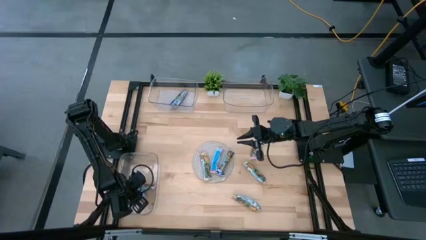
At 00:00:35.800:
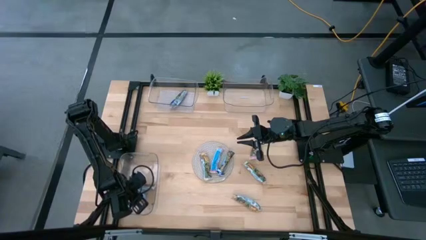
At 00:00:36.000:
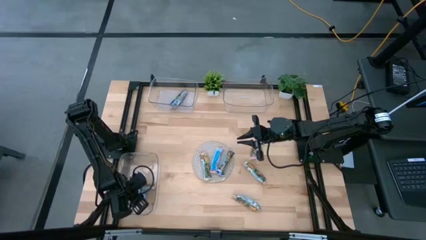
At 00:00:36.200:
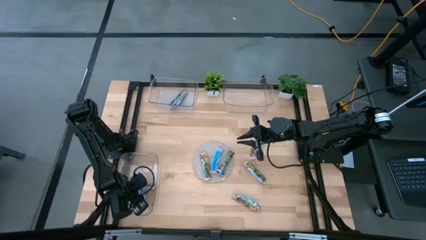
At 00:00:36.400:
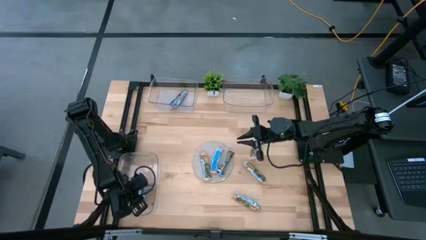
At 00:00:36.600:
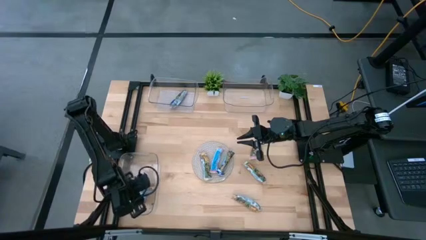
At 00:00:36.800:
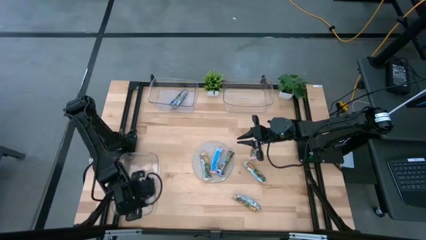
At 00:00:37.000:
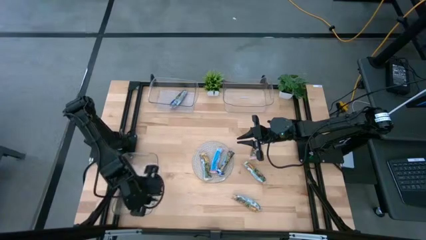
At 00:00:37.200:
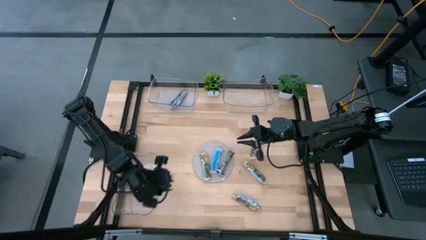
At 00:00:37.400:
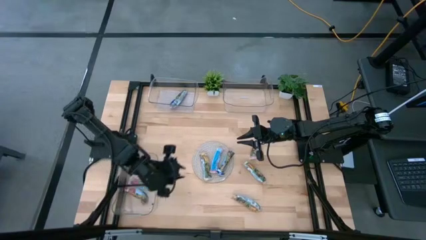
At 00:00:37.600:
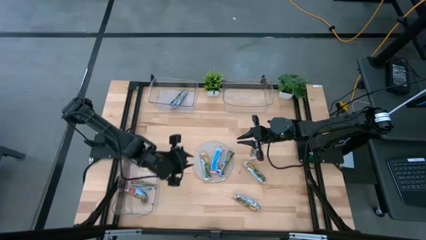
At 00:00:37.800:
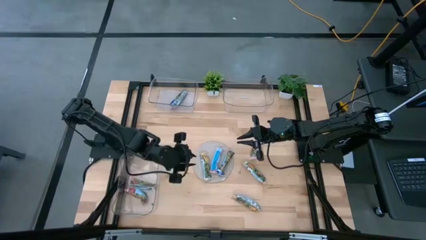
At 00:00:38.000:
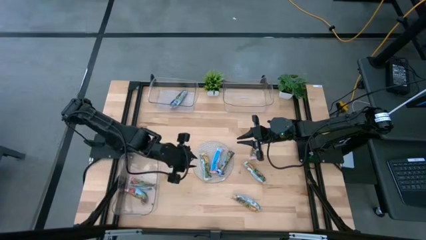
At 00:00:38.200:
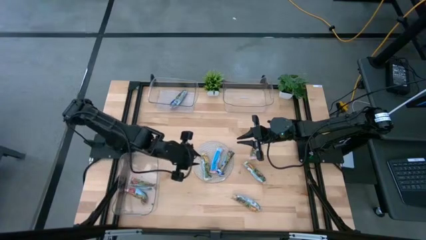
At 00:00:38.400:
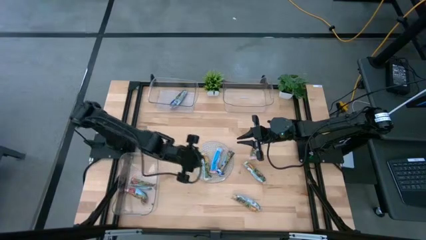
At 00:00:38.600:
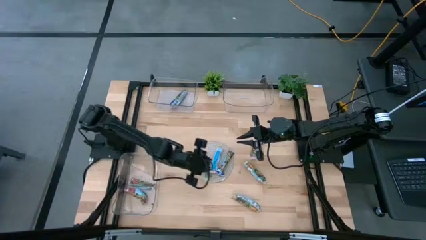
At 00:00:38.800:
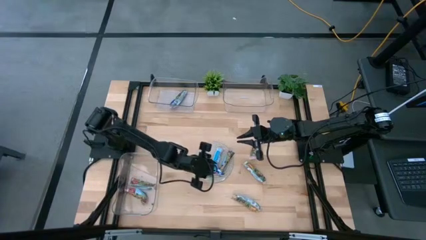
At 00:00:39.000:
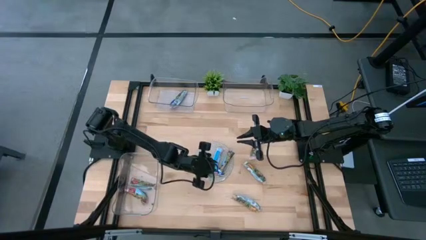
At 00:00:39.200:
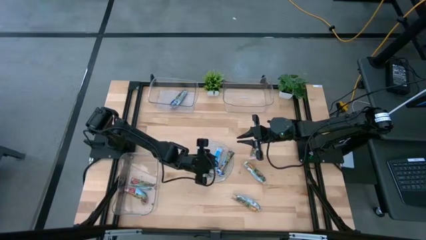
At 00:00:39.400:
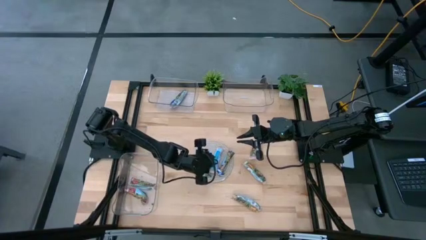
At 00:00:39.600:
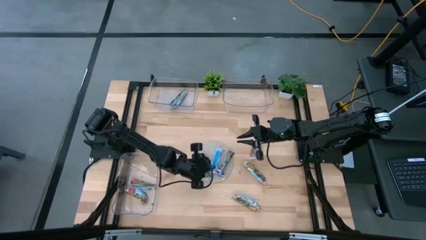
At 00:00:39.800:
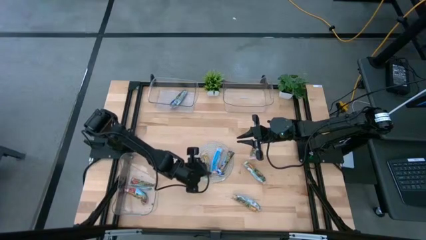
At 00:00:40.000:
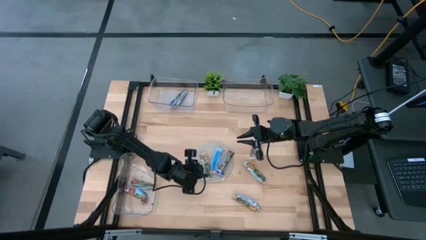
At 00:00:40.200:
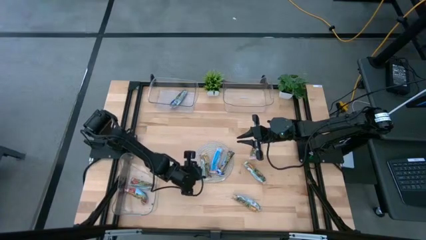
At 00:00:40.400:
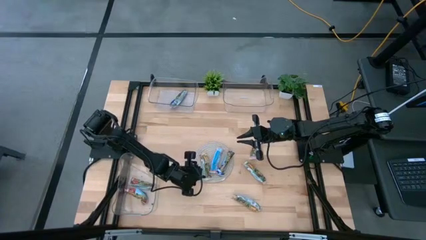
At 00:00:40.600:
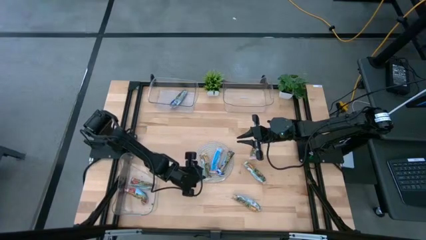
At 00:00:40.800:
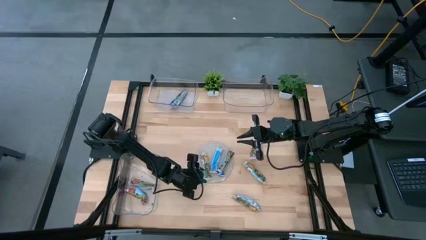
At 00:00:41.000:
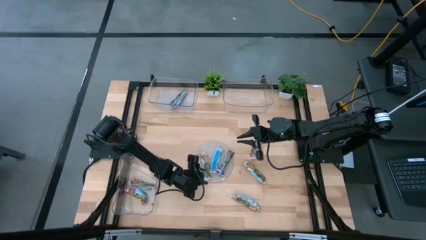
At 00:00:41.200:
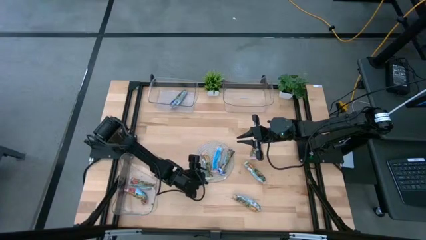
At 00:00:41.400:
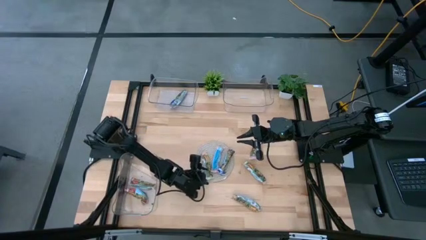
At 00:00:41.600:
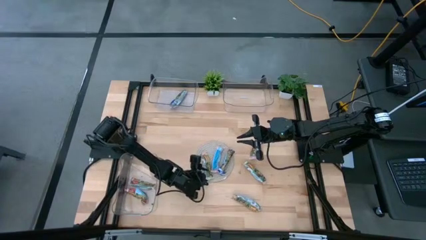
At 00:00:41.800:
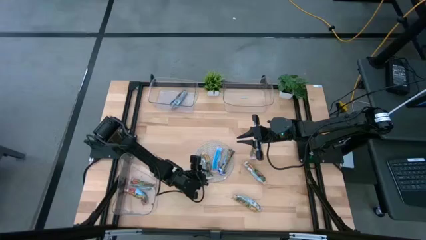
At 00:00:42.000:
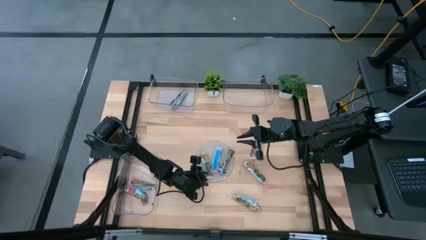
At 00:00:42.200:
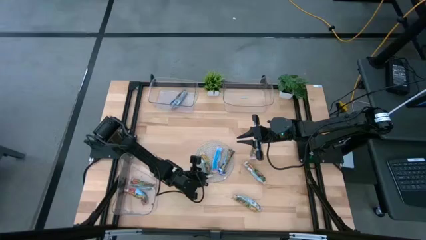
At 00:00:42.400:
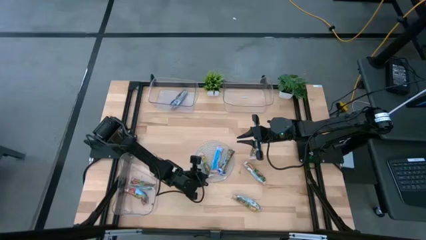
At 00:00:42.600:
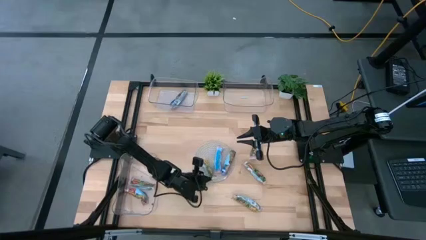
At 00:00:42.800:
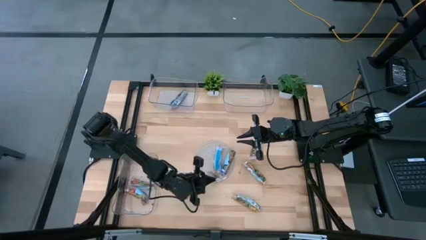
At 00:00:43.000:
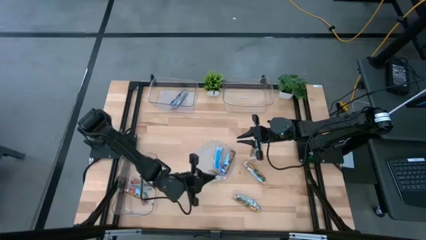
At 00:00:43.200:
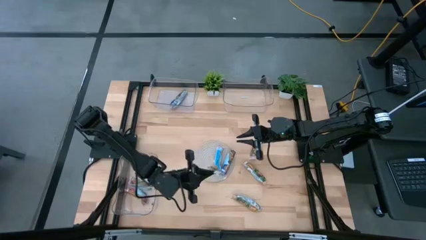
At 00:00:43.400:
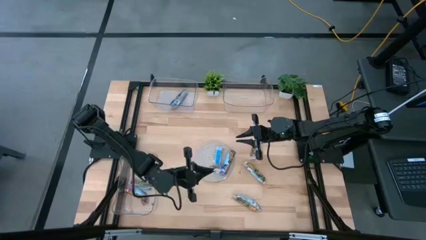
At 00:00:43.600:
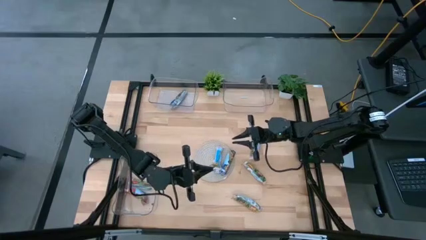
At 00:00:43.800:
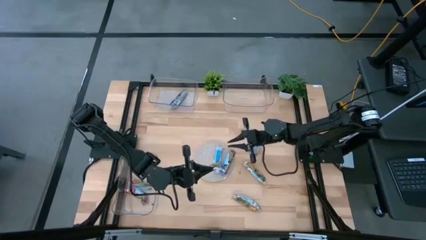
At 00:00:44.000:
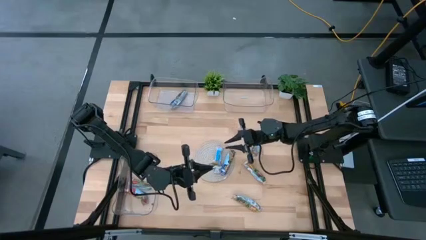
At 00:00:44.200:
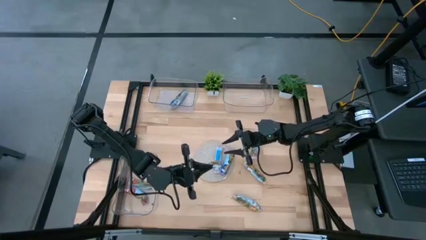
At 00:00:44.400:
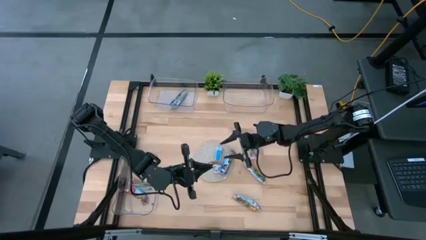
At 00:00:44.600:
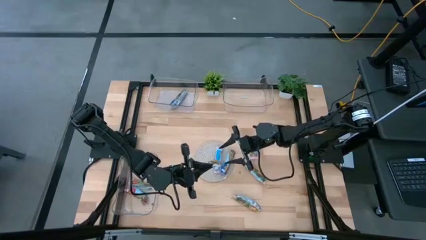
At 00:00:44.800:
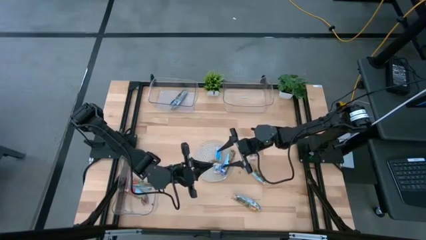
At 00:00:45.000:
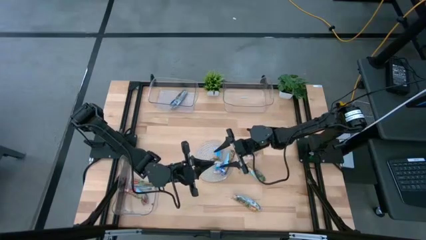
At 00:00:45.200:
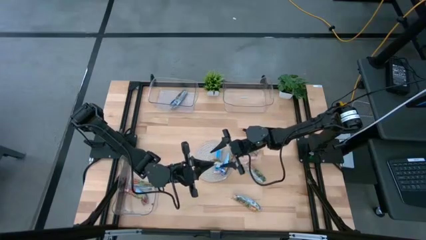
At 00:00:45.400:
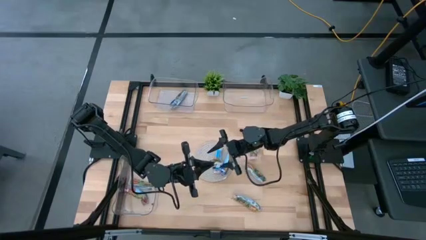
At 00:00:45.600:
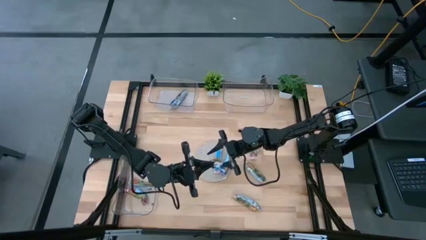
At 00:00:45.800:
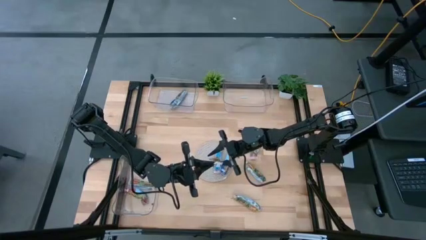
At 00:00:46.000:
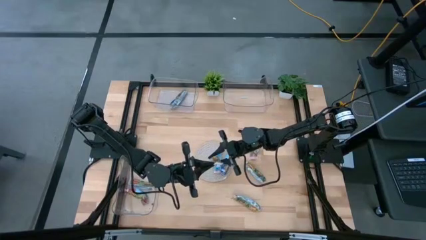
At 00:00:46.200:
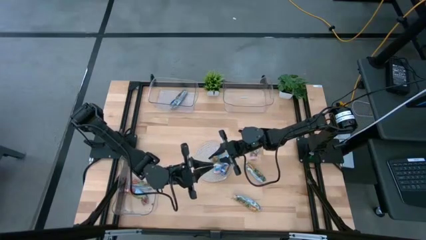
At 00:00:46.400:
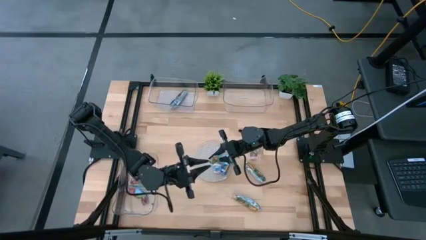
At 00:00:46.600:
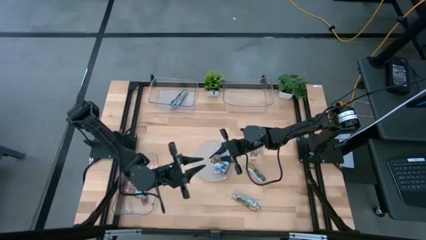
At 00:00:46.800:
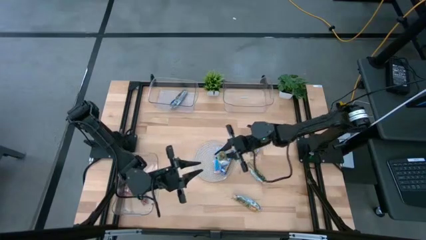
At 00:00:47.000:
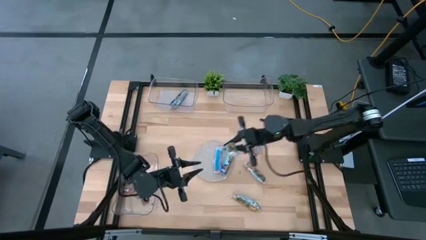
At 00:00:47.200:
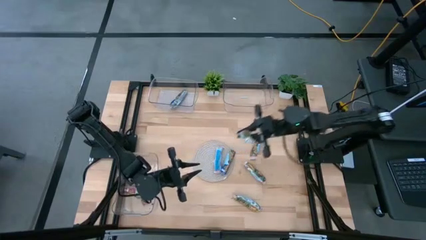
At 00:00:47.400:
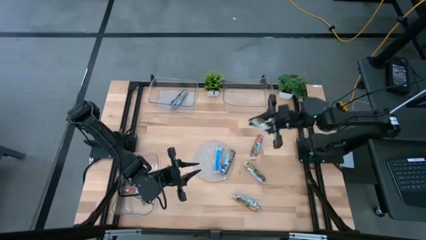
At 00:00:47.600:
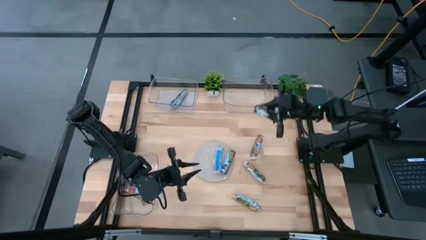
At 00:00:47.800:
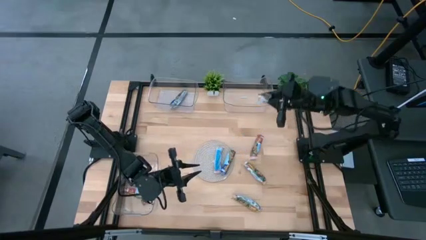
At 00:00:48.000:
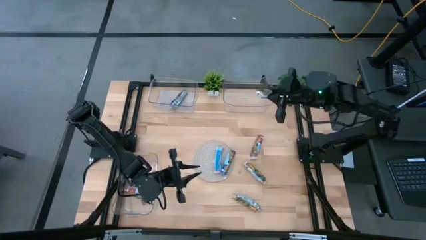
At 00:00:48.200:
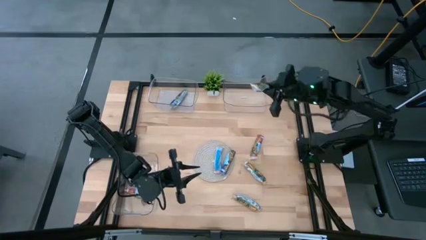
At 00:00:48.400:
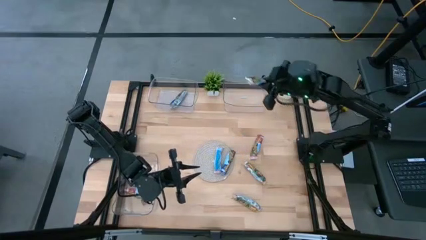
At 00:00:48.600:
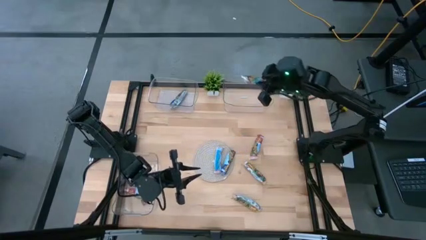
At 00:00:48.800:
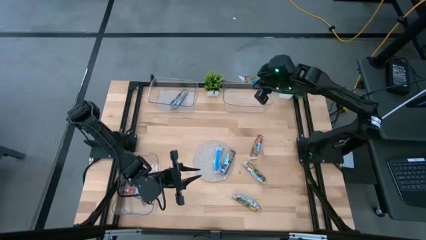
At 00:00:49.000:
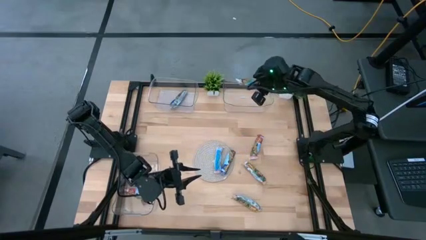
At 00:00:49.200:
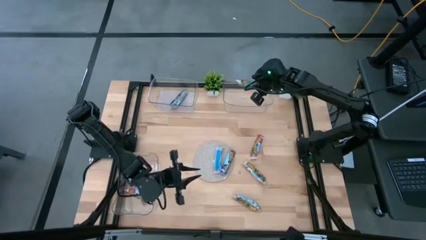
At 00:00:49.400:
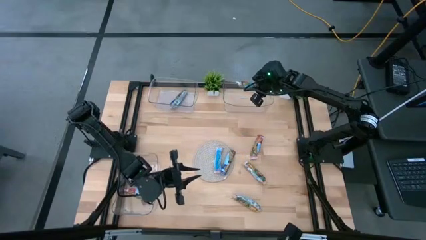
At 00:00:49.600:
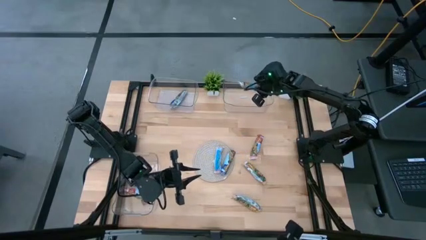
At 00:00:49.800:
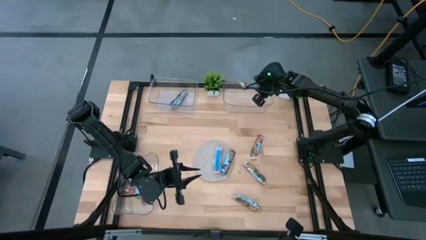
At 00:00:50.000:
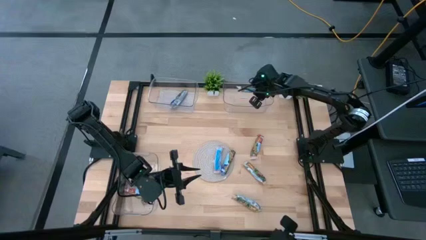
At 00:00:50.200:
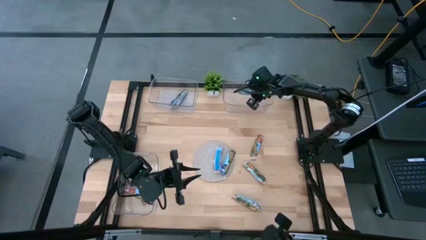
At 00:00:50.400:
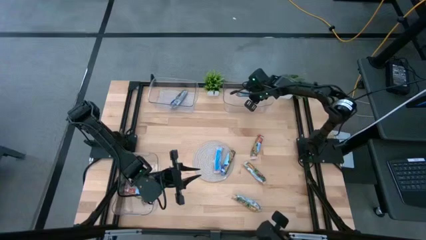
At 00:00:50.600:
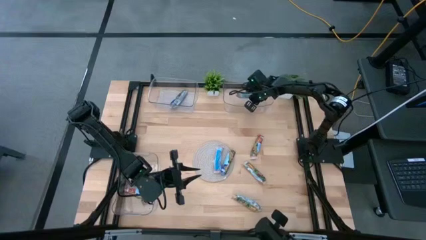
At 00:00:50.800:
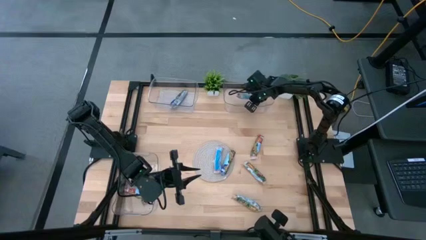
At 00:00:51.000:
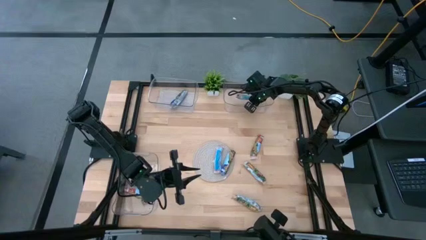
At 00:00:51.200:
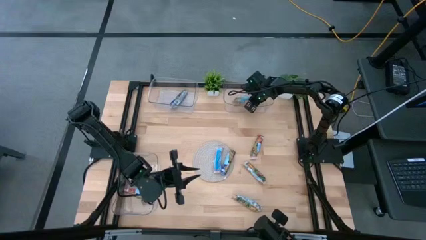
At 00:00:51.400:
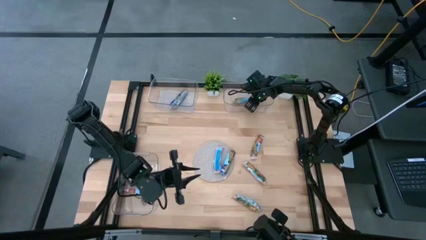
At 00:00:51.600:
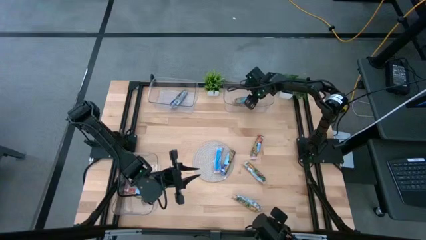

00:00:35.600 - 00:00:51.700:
Task: Pick and place Granola Bars by type
Put the yellow granola bar into the top right transparent bin
